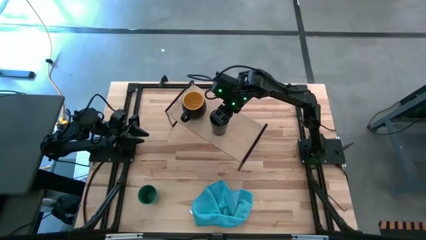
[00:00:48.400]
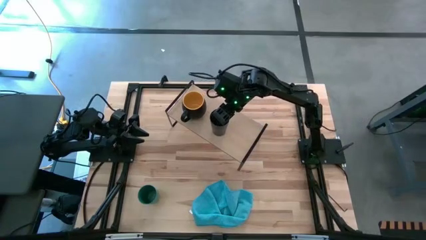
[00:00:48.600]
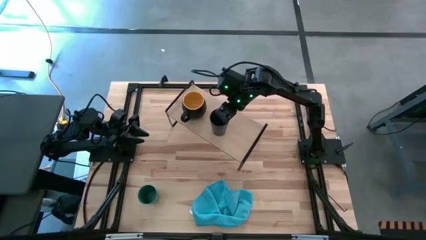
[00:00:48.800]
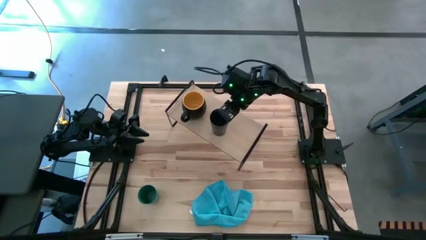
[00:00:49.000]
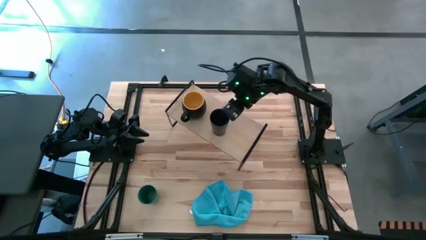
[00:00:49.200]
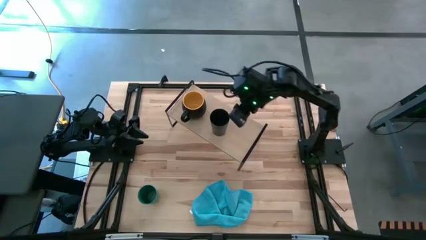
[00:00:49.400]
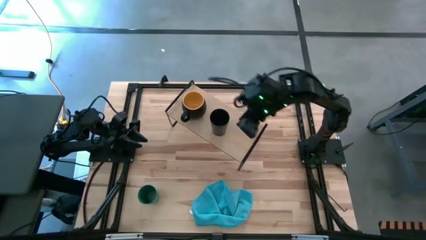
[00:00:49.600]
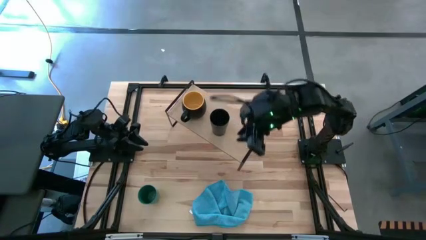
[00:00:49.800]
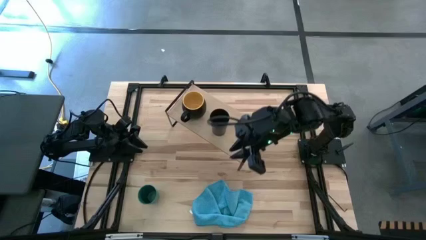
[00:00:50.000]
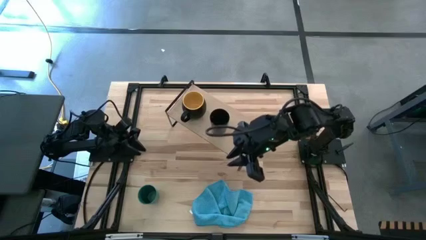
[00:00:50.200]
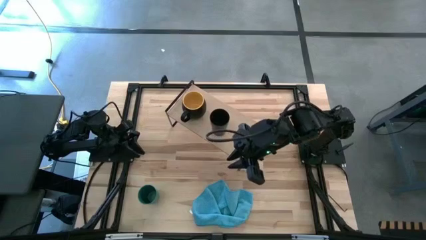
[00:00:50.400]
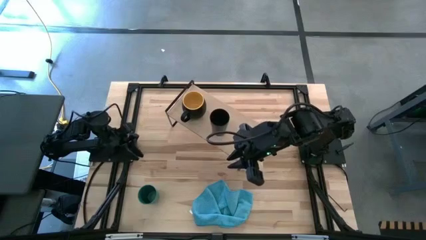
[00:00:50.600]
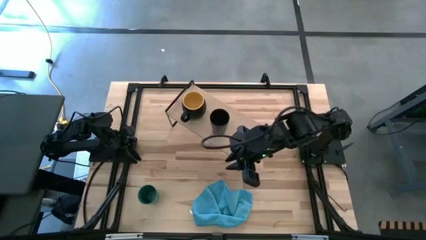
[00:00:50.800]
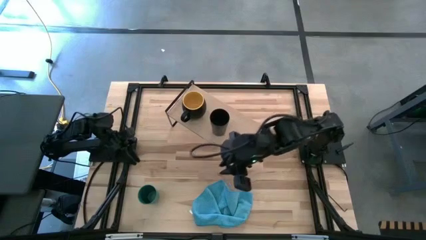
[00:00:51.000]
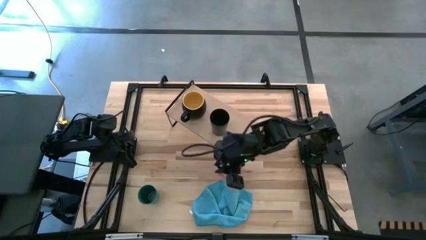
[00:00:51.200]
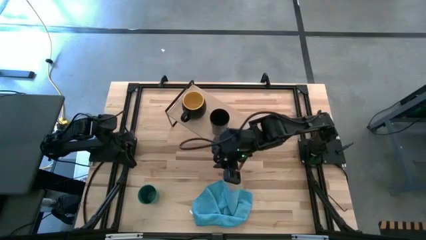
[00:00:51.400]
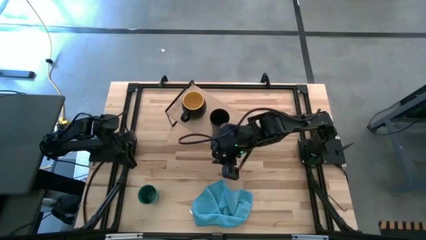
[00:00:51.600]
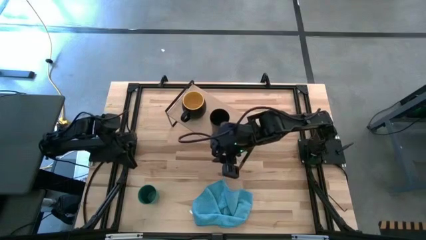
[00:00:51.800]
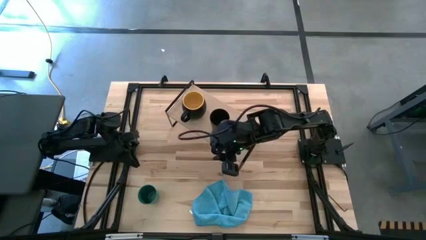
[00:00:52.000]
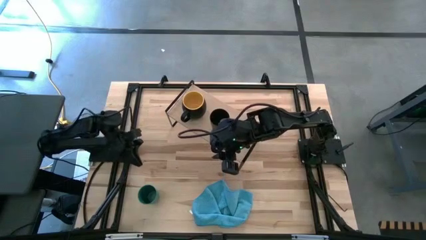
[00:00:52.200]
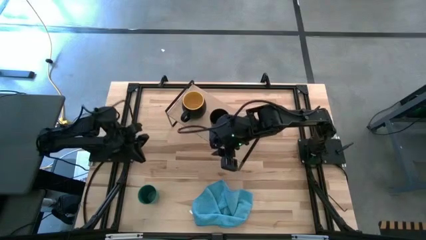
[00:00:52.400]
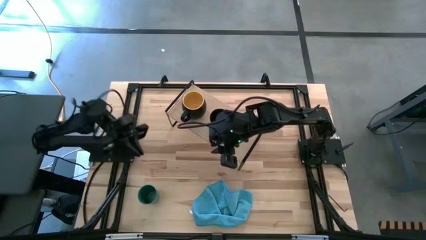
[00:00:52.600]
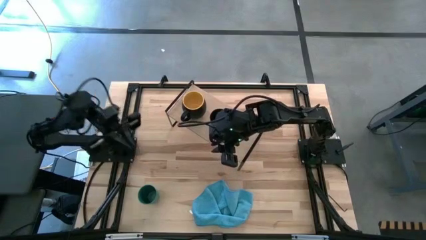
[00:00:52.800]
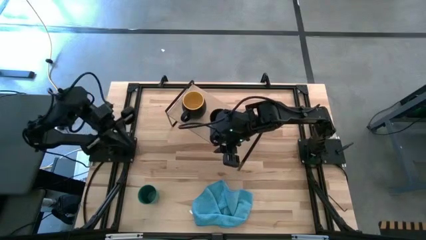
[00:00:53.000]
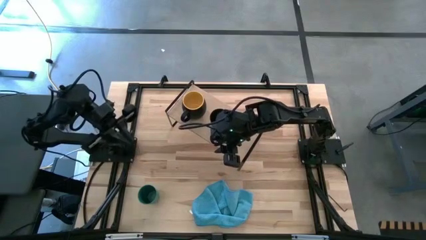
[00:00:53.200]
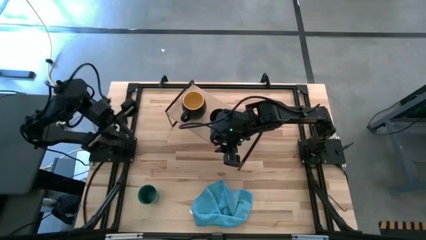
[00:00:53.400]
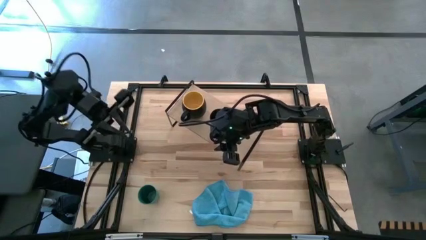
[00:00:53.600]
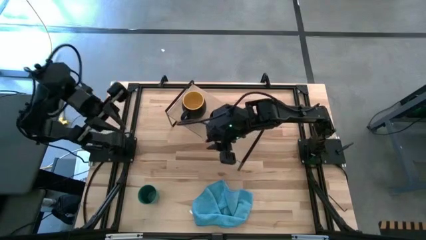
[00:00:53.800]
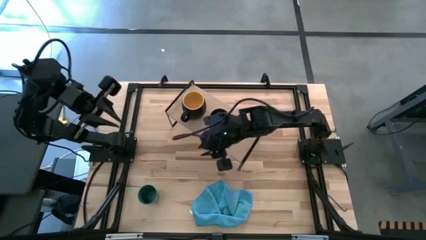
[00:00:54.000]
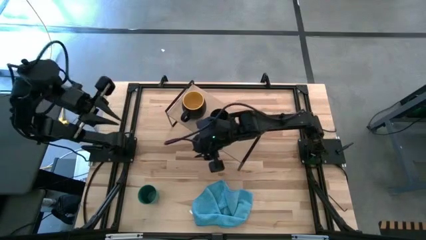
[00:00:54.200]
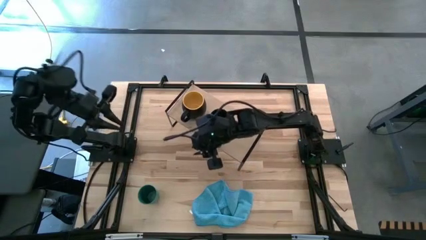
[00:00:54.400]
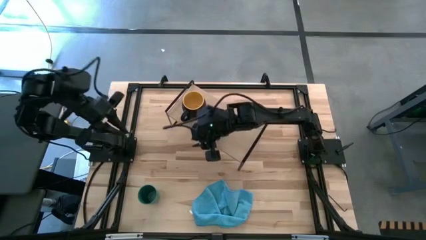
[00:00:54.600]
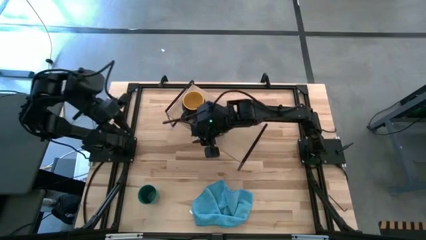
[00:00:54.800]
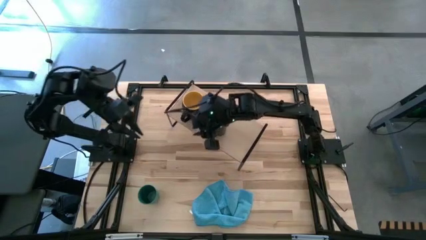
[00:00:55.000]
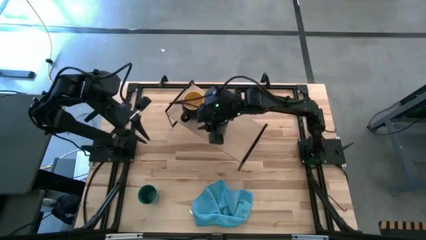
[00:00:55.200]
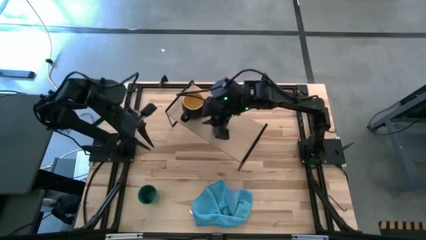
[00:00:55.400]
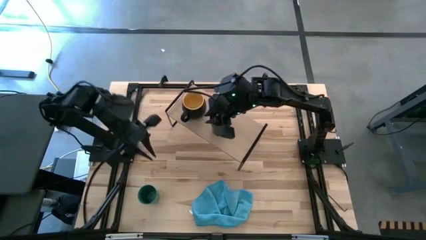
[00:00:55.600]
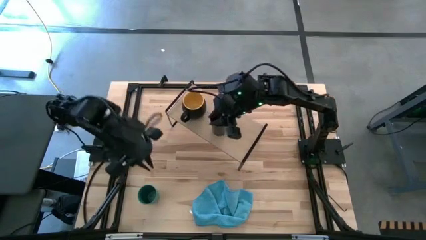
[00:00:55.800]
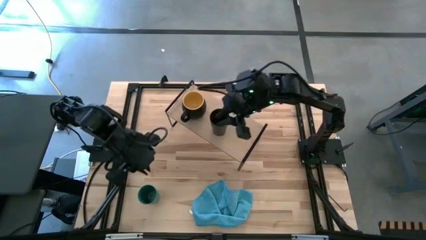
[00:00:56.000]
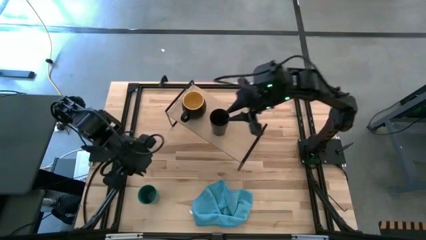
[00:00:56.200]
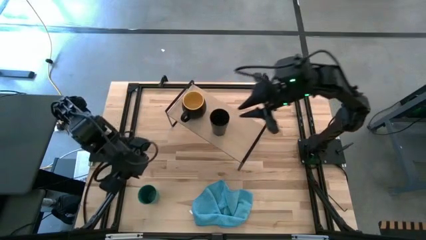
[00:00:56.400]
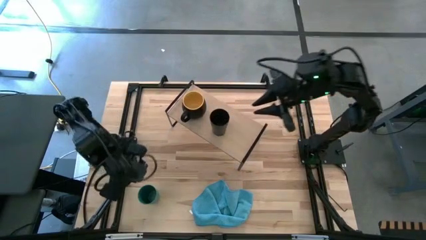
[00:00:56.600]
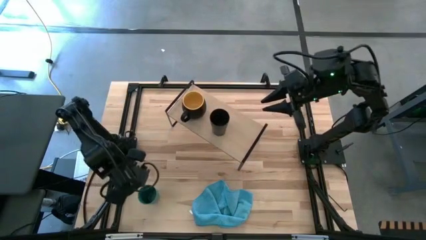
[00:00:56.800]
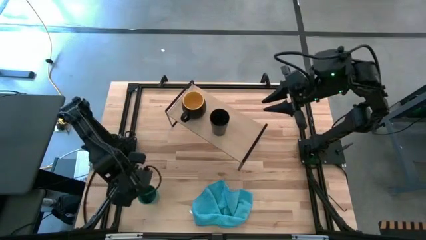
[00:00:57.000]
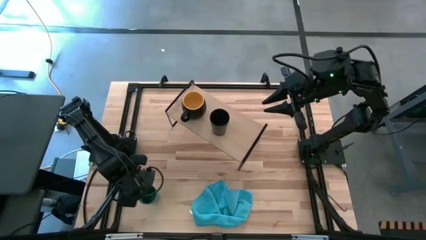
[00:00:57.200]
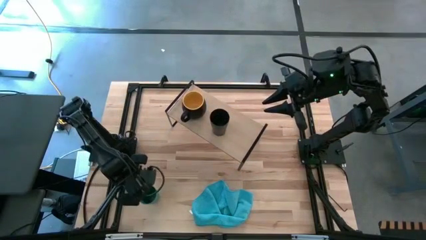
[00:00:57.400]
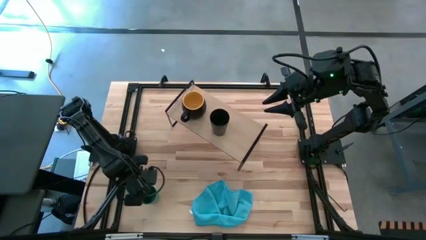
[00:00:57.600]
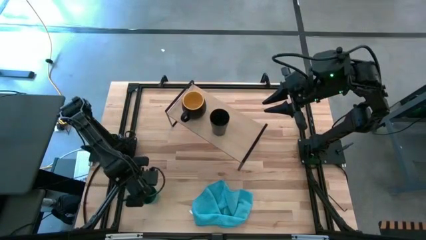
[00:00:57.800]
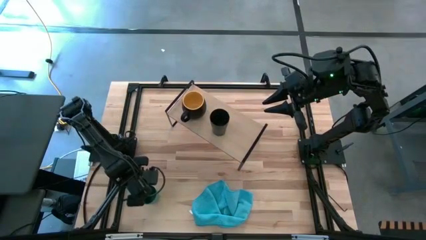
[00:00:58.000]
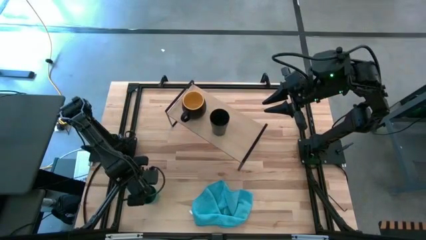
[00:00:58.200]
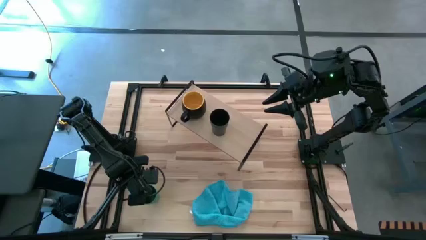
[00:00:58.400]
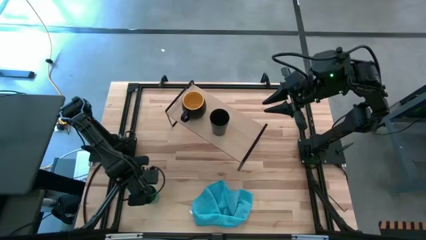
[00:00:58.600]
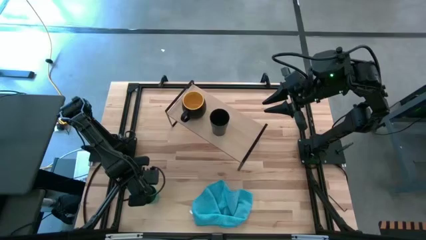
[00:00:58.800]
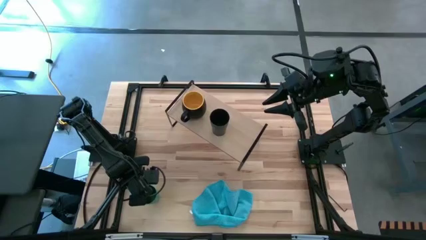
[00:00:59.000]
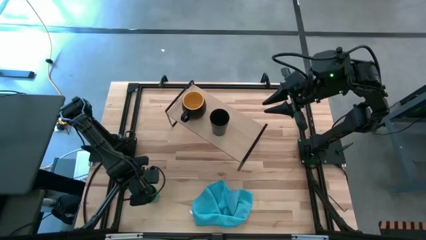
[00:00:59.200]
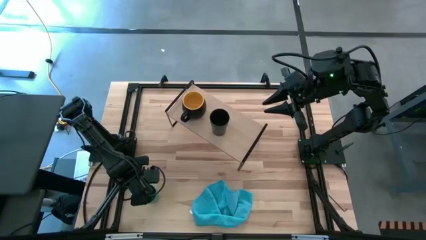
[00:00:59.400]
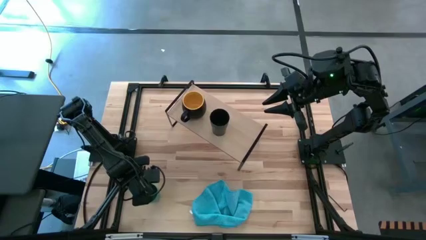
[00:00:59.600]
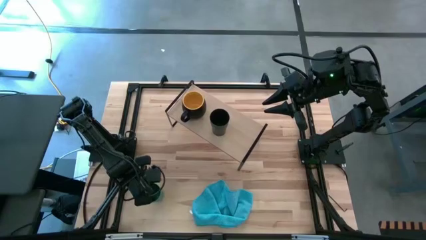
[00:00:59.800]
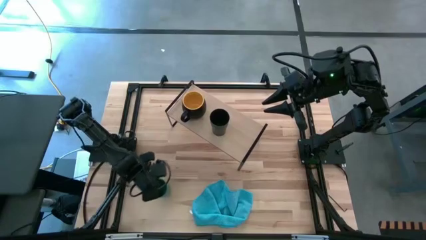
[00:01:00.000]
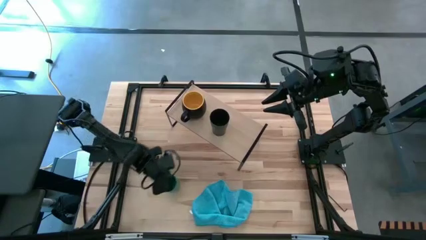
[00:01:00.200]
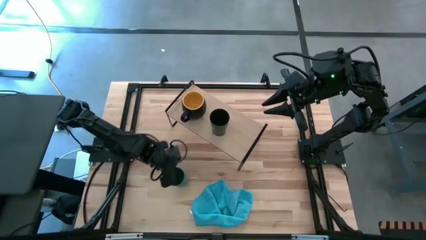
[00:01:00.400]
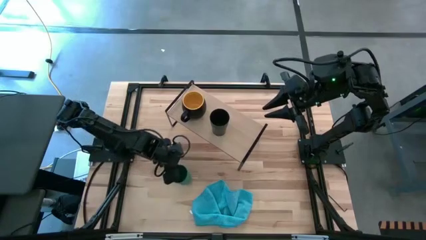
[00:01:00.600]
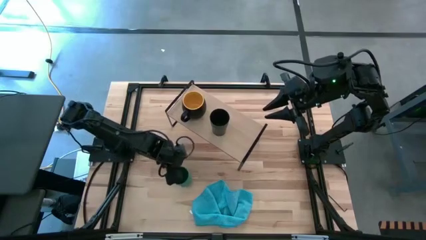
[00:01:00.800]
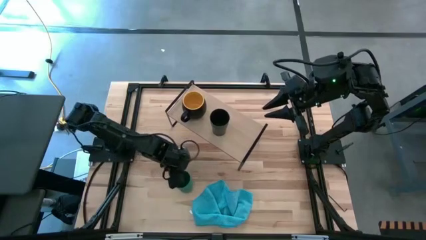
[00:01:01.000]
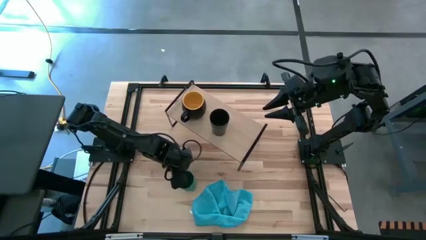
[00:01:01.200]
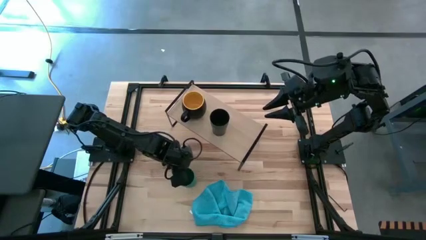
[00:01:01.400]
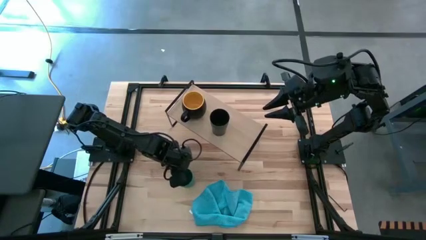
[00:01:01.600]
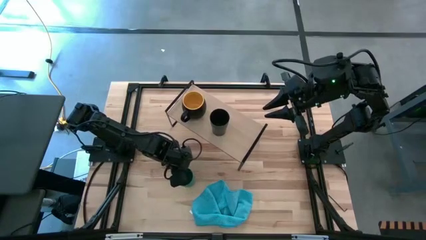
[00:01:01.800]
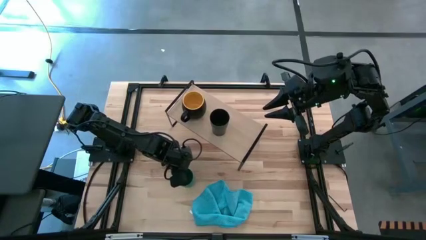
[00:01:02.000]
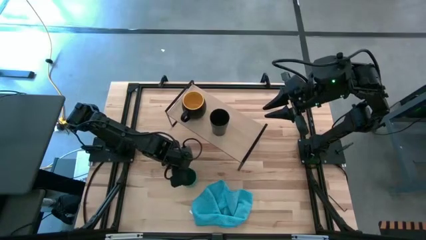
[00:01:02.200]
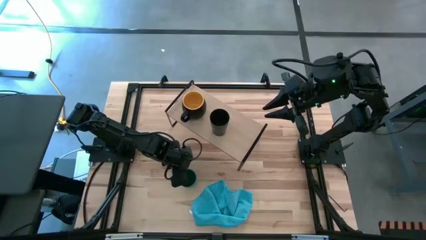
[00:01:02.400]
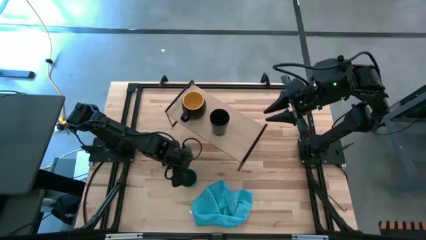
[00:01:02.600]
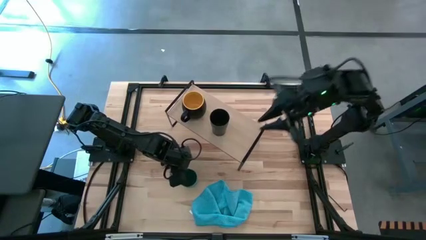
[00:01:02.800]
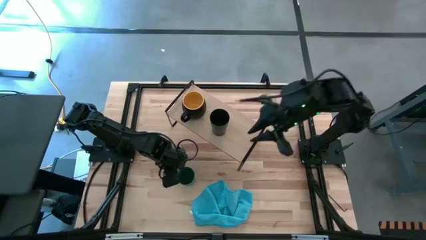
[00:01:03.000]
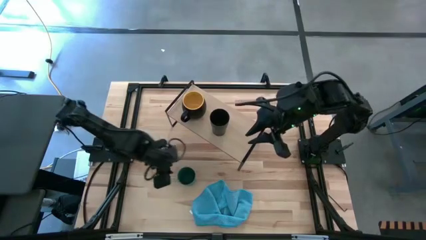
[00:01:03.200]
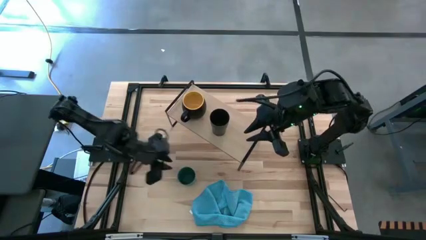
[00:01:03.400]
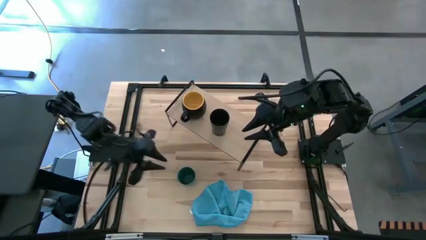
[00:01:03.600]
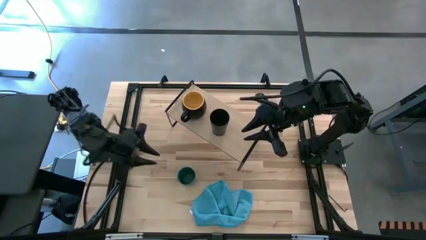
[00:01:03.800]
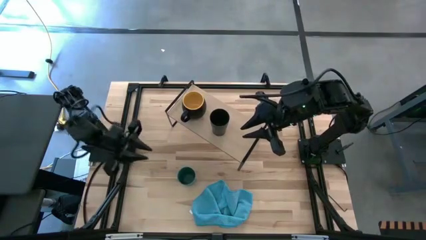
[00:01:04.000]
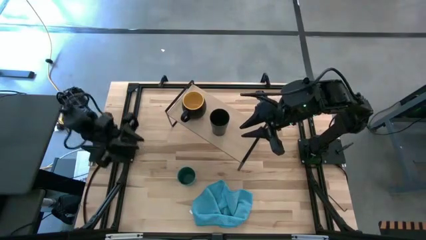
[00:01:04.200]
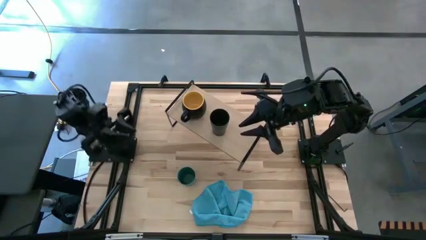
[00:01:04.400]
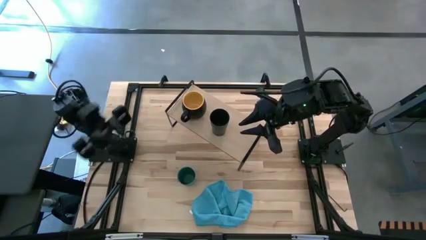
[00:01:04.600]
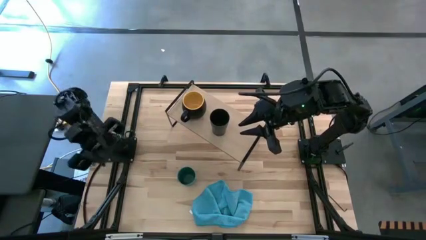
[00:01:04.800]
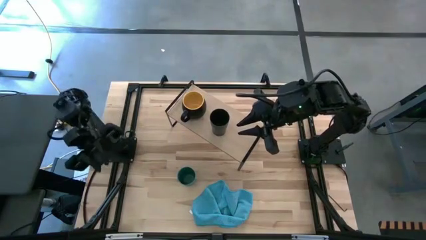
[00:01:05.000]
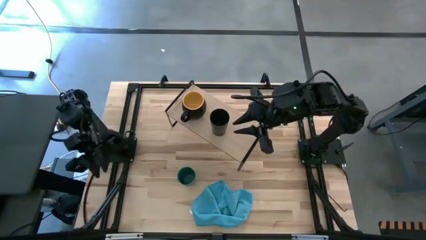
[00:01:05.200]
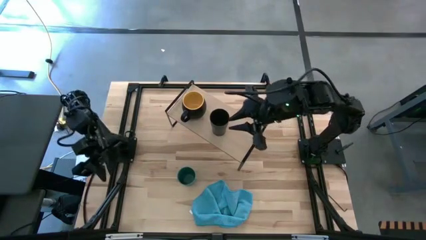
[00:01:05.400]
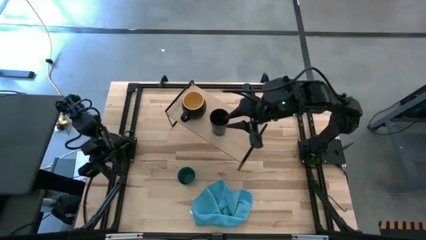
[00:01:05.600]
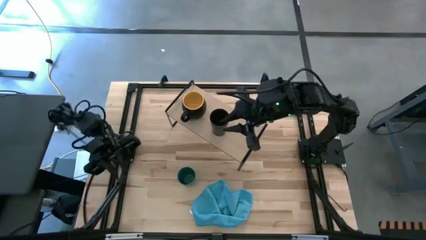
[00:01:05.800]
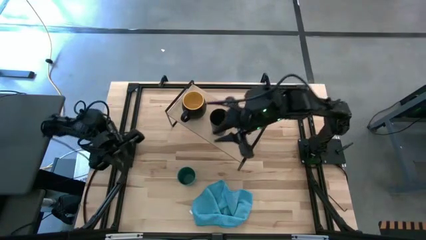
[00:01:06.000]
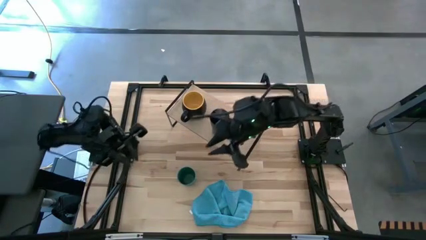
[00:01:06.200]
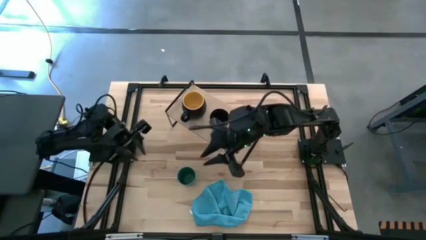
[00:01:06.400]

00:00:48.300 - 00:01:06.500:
Task: Stack small to large cups/mugs on shelf
Put the green cup on the shelf
